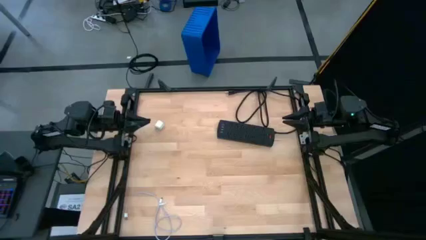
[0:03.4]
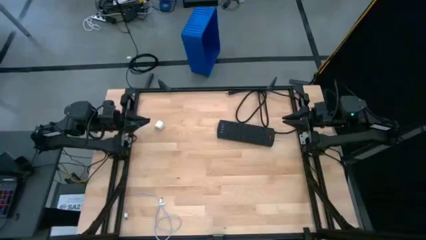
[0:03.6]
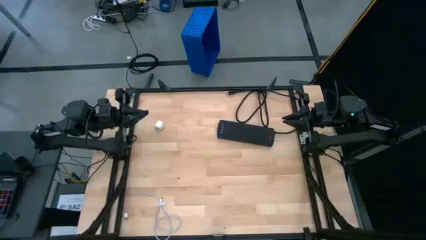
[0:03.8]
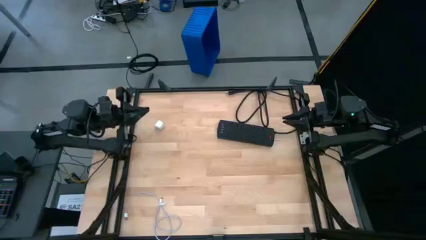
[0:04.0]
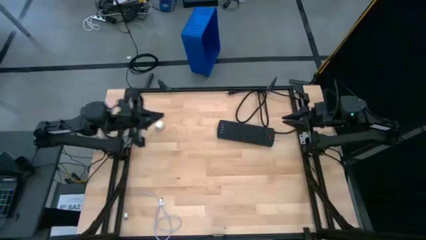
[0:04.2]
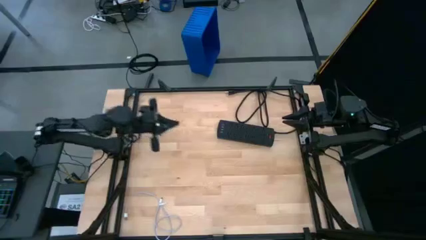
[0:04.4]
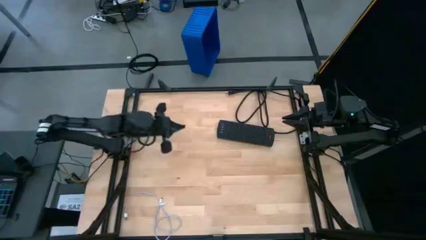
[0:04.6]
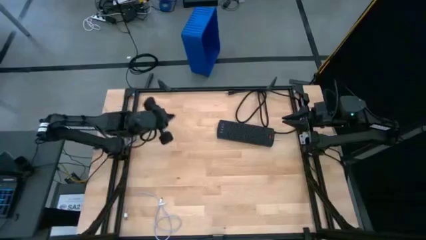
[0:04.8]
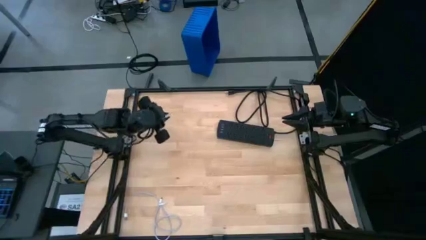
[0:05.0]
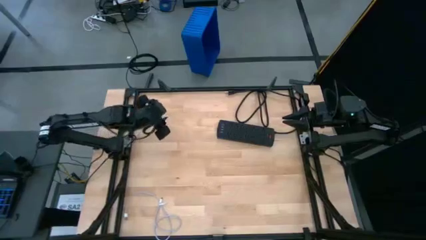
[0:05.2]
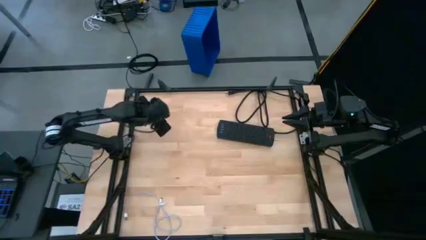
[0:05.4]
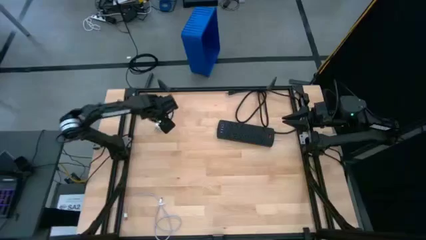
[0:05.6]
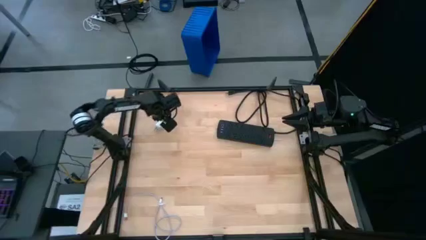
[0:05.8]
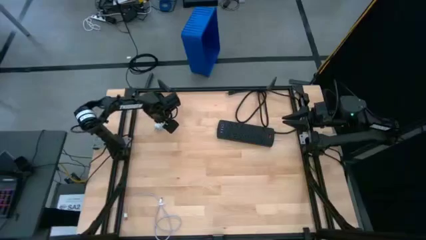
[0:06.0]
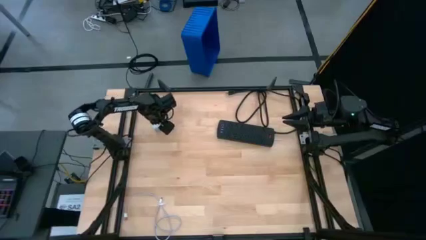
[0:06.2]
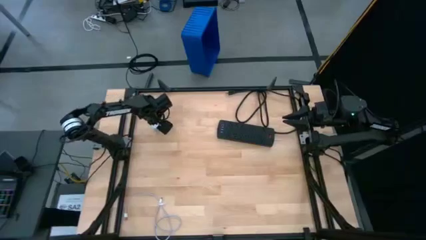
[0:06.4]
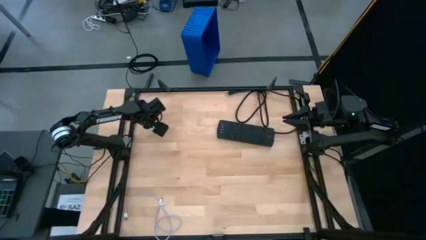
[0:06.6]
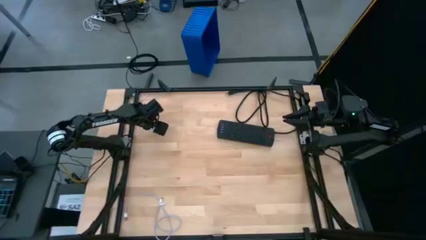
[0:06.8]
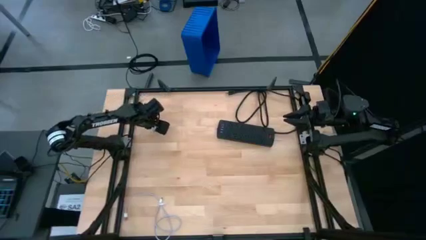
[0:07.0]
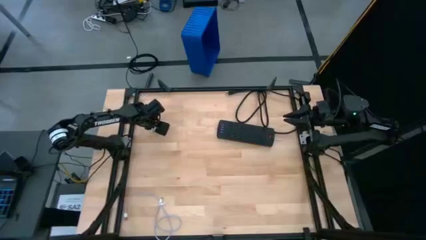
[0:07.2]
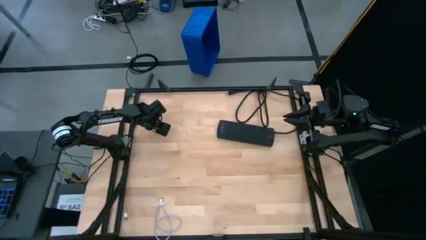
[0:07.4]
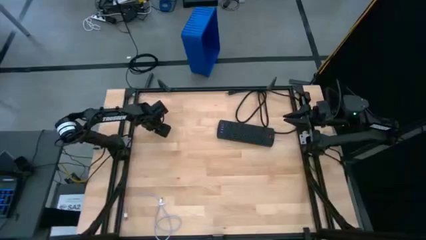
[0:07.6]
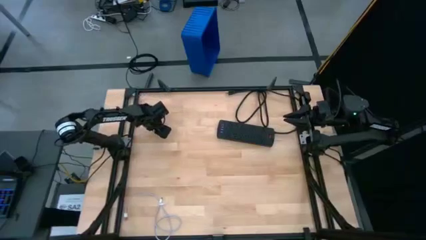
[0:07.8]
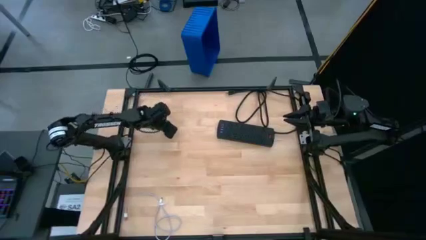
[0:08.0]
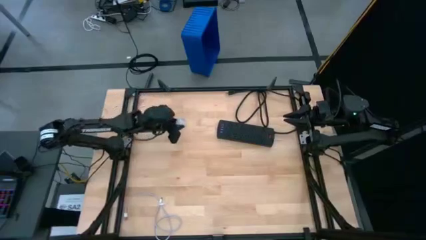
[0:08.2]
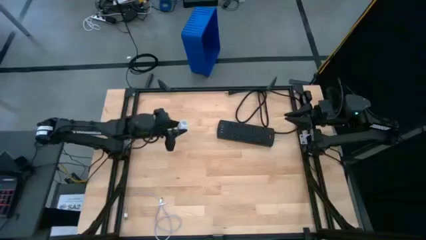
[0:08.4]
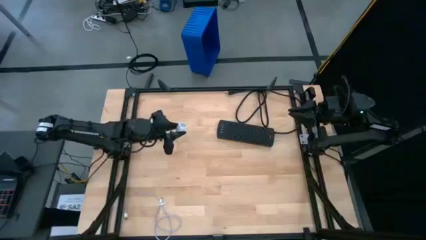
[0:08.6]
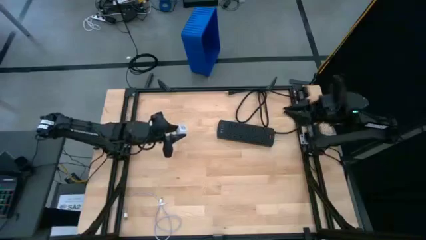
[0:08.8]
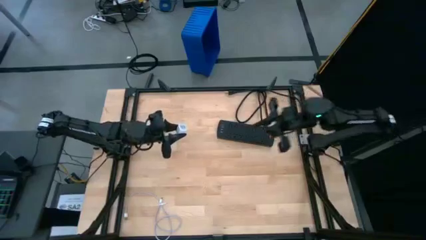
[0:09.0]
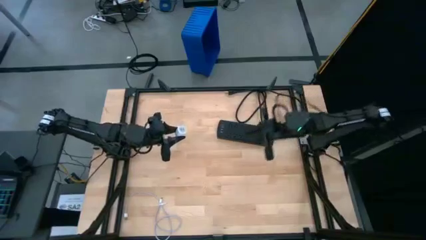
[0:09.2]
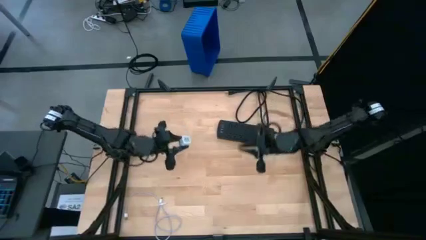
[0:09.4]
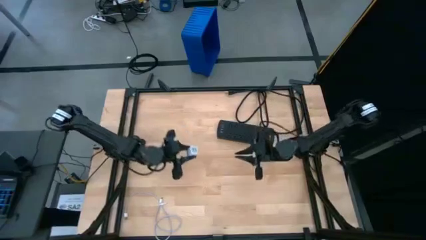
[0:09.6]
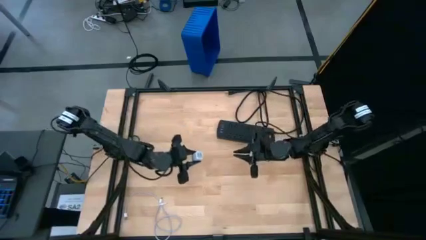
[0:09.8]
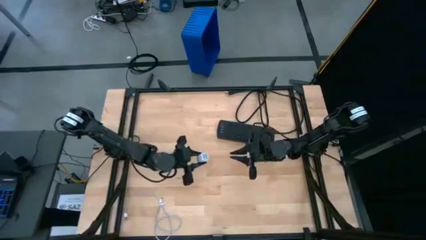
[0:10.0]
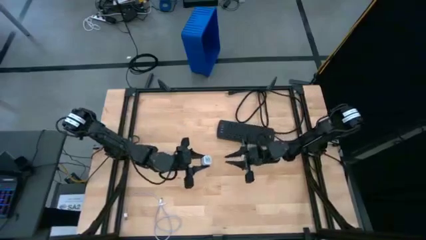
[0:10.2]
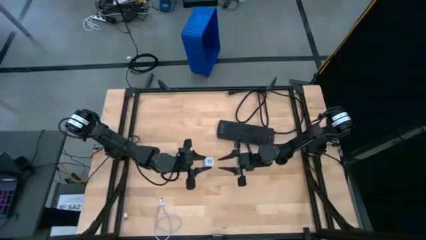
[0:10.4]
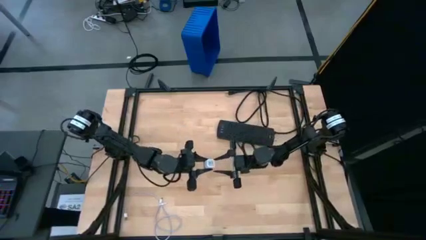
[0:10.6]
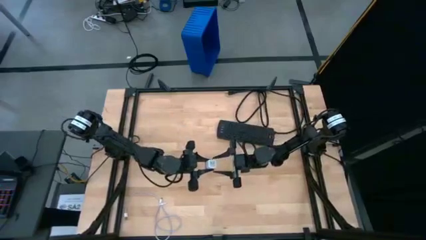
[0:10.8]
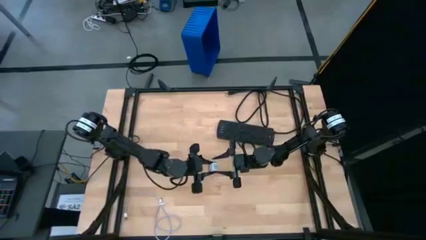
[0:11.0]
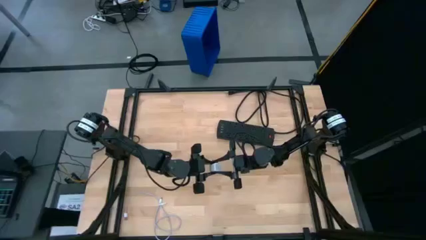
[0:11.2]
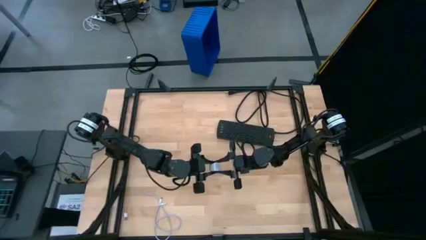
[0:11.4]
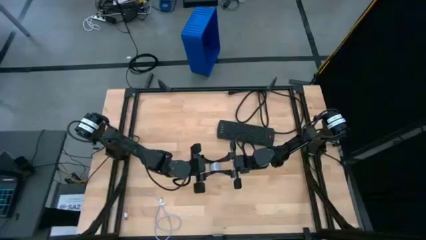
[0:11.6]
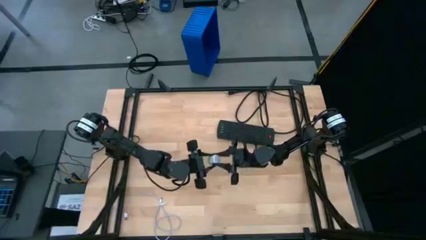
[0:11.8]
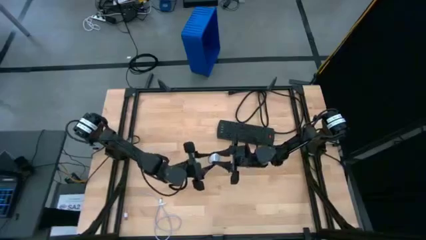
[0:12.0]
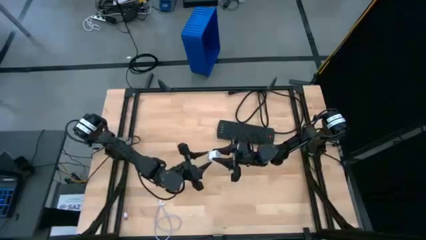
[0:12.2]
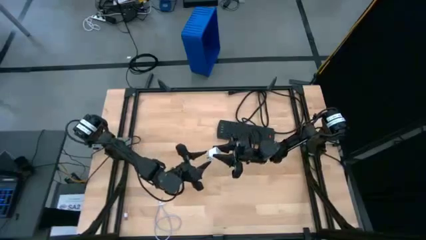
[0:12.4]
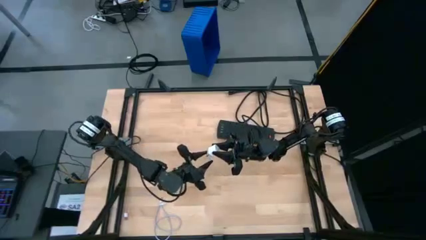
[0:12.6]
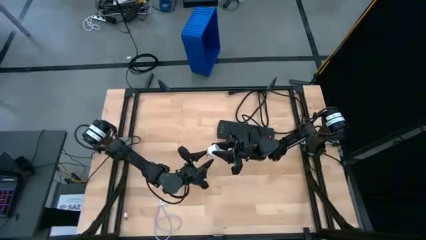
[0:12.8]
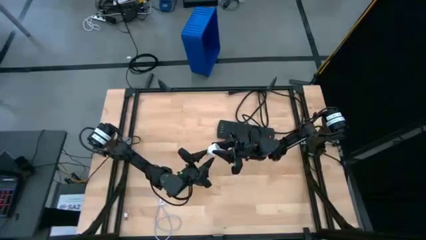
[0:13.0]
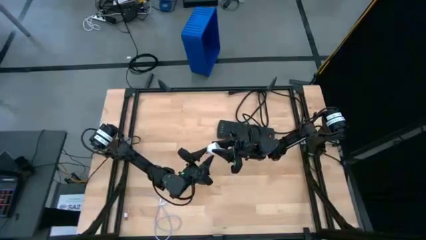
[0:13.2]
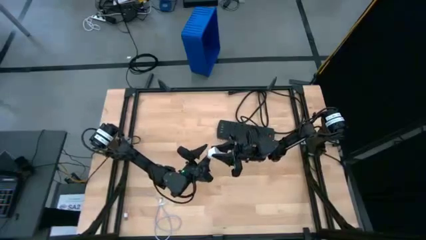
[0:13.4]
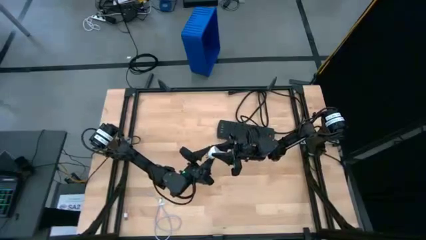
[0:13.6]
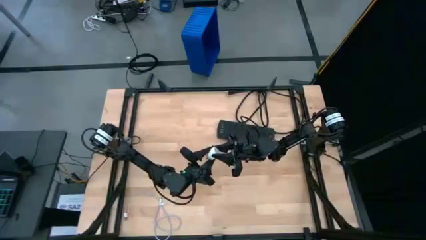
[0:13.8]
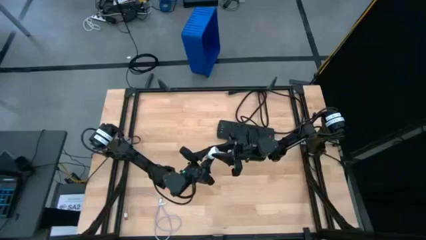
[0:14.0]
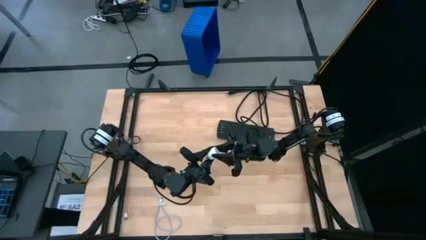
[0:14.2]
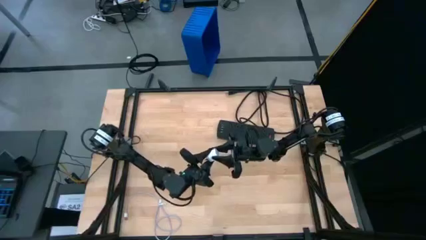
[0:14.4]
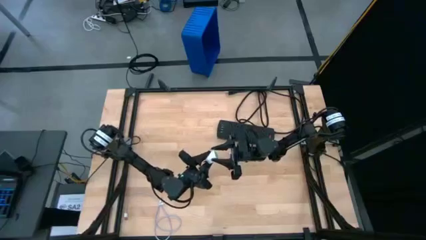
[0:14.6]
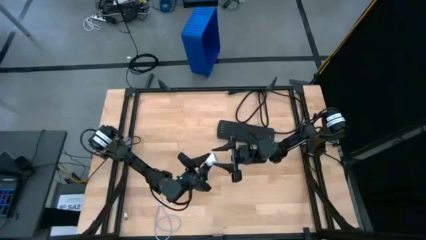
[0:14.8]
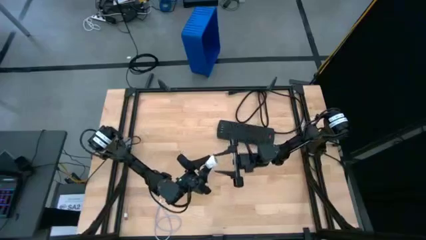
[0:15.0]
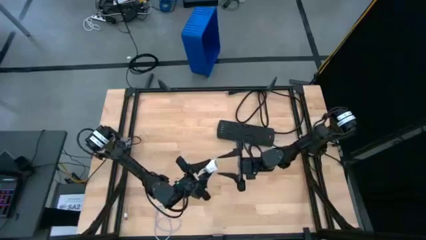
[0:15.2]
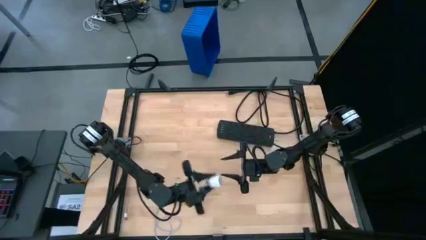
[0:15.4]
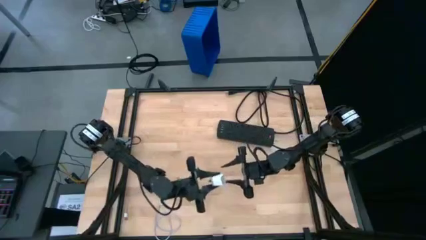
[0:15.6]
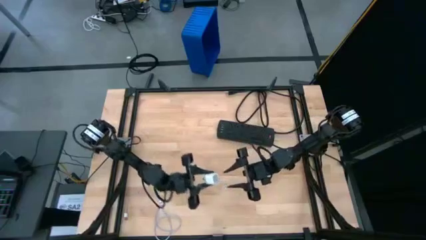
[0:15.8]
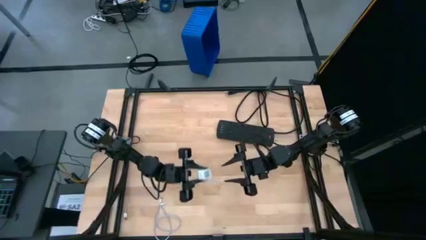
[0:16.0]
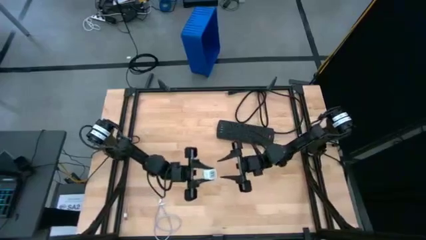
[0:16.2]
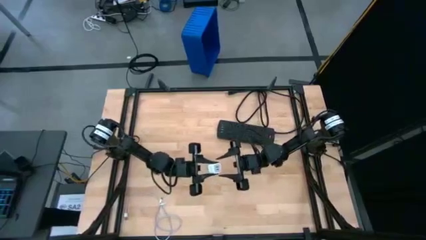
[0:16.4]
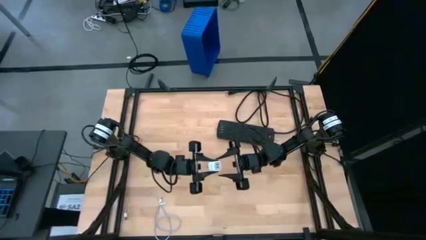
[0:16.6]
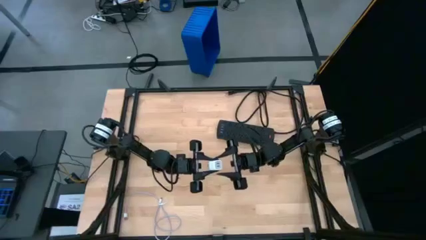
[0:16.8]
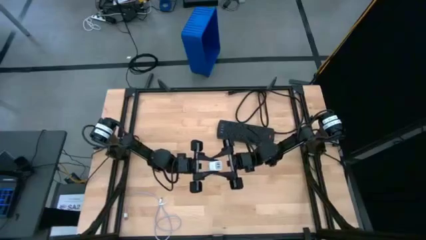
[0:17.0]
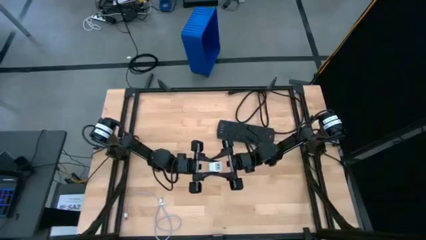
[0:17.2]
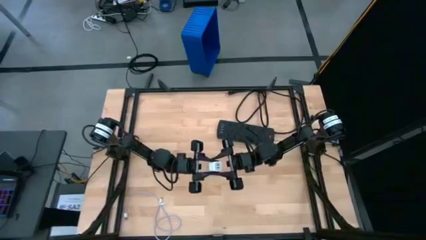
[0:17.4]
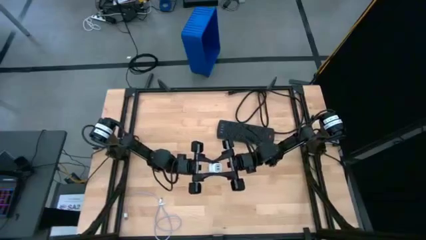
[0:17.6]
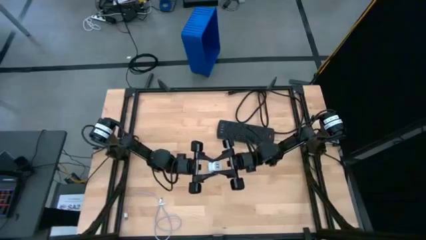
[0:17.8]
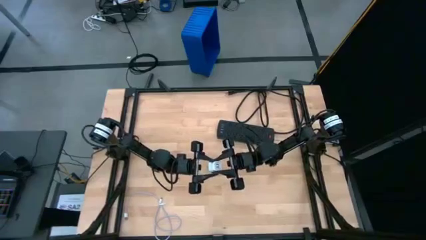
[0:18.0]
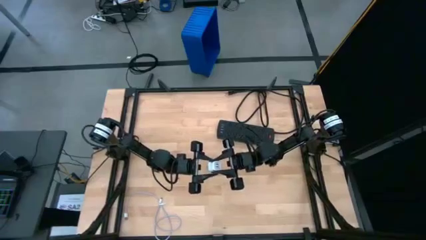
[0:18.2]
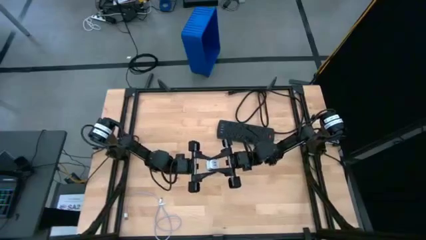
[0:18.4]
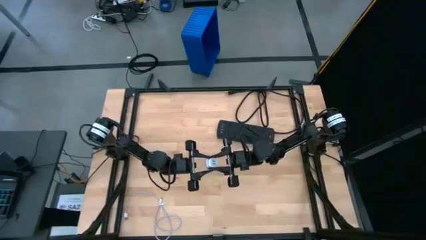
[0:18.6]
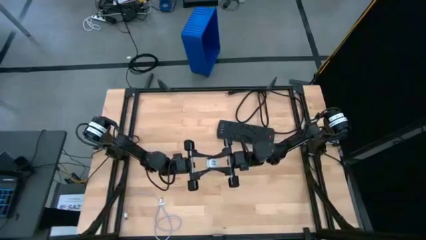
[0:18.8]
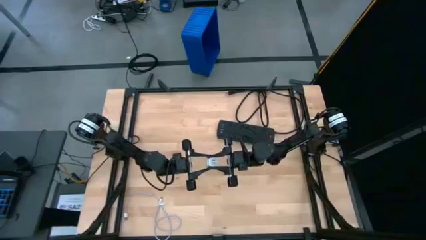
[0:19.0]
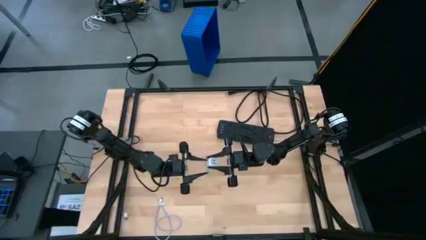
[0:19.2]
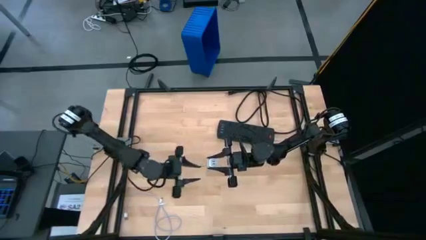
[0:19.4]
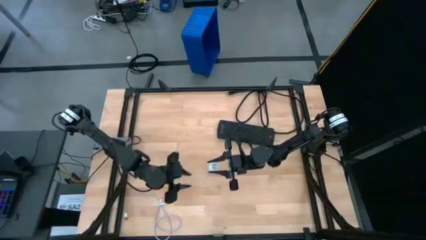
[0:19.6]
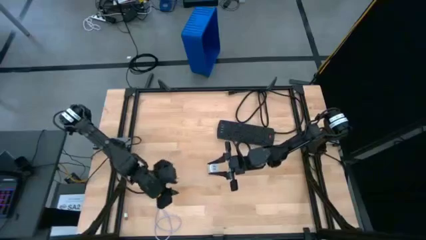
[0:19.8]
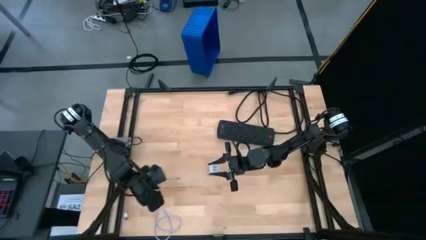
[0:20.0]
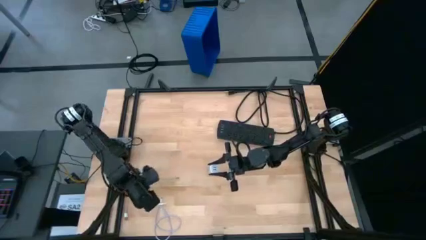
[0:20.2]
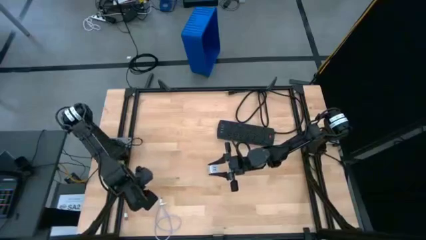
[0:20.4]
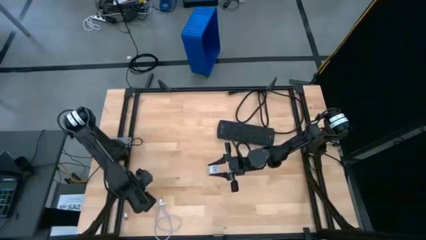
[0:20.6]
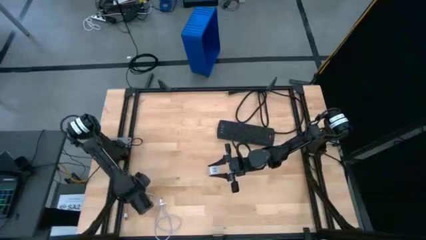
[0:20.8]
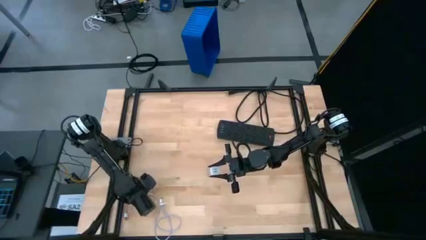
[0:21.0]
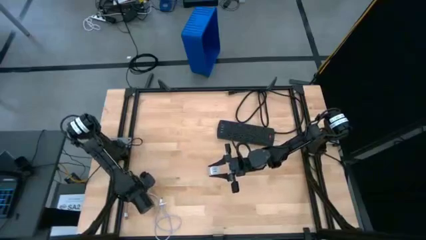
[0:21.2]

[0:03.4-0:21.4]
Task: Insert USB
Insert the white charger cable into the white charger adapter
